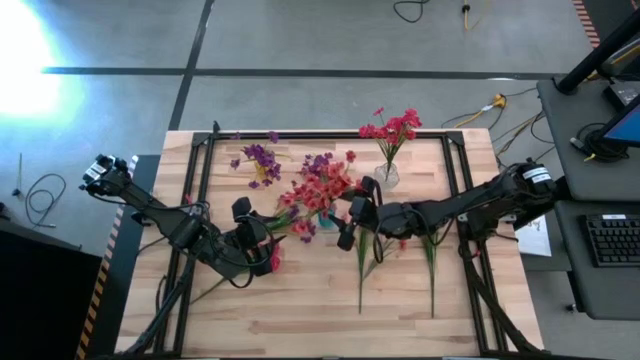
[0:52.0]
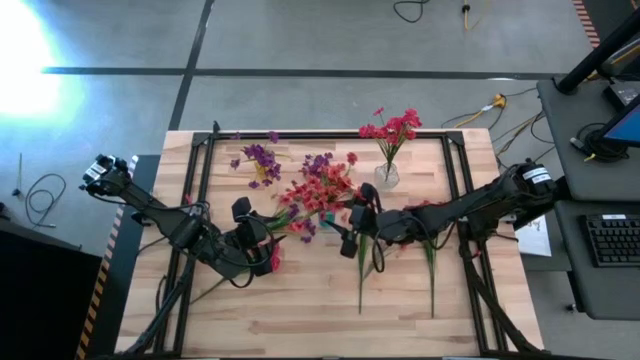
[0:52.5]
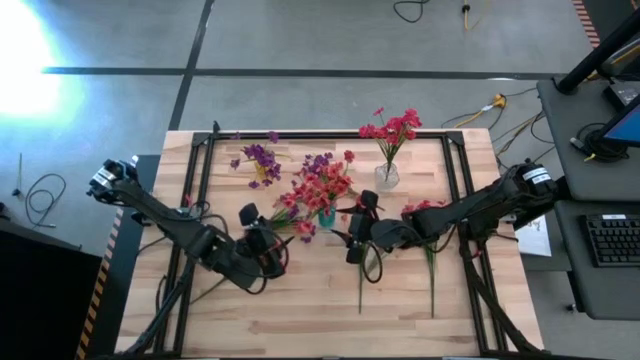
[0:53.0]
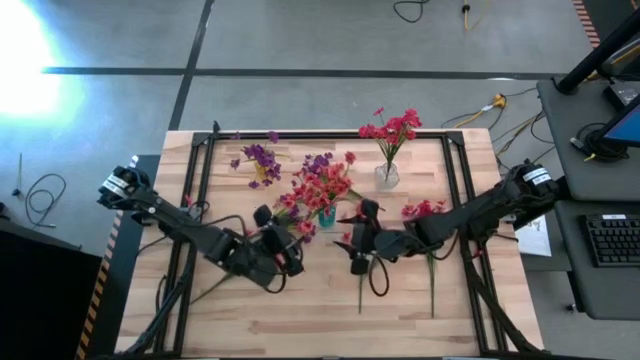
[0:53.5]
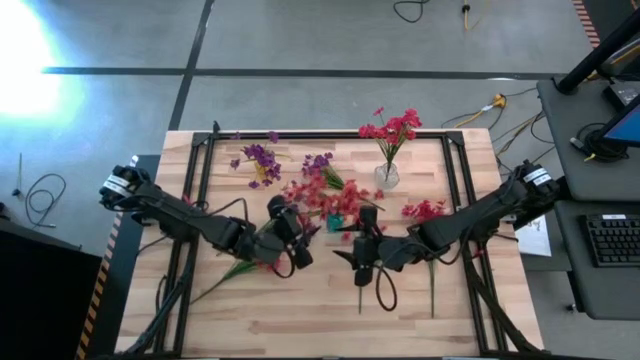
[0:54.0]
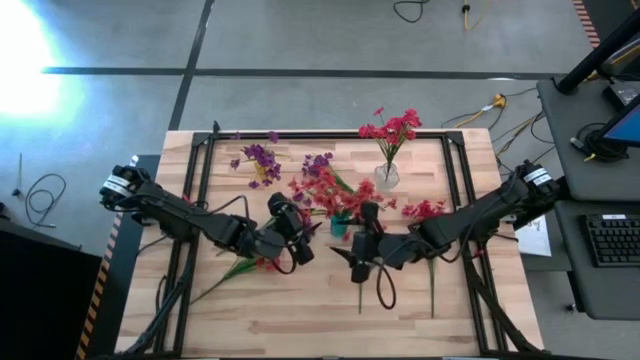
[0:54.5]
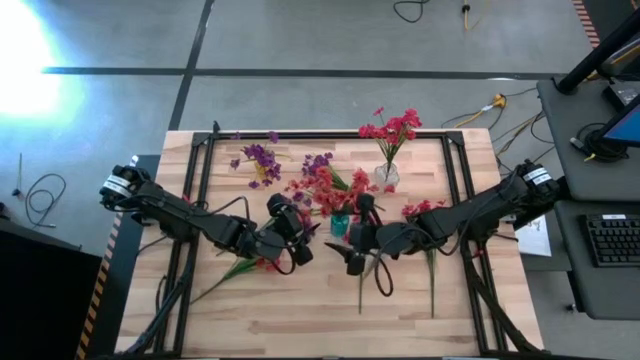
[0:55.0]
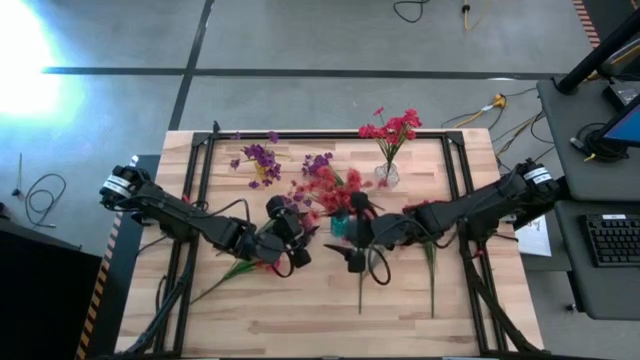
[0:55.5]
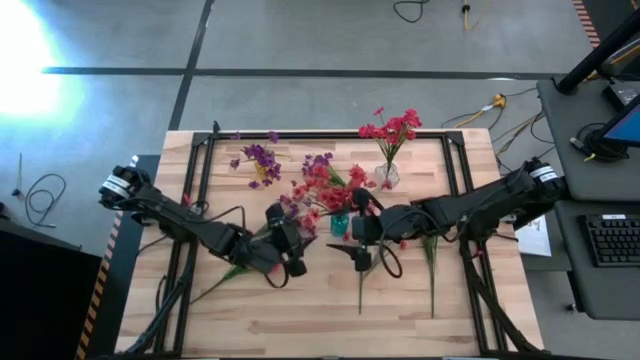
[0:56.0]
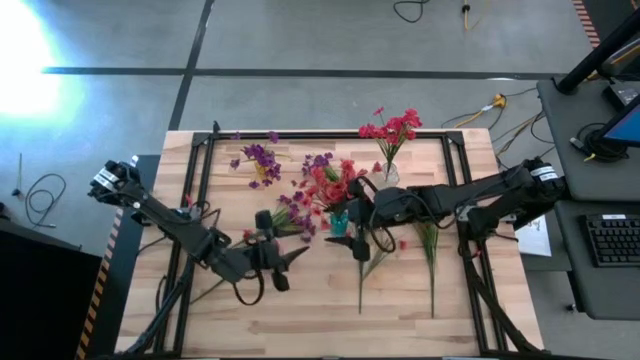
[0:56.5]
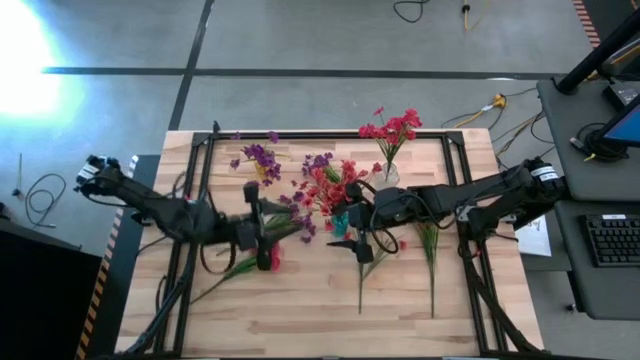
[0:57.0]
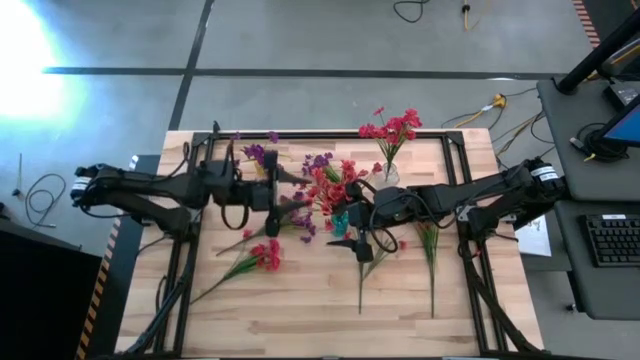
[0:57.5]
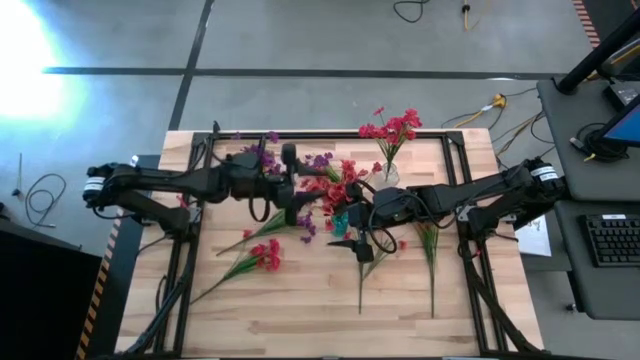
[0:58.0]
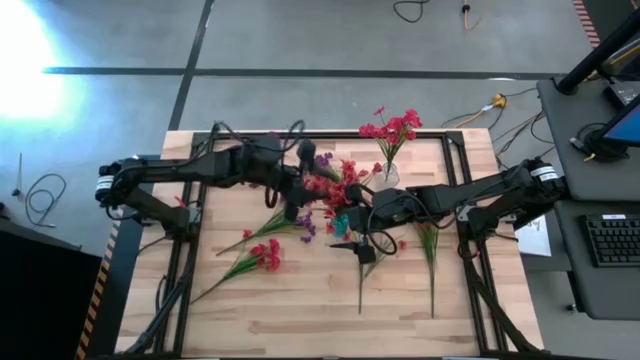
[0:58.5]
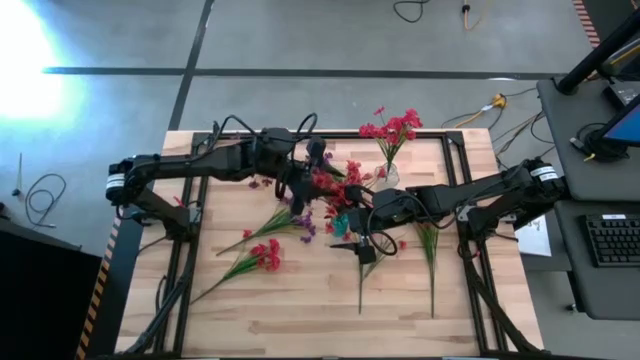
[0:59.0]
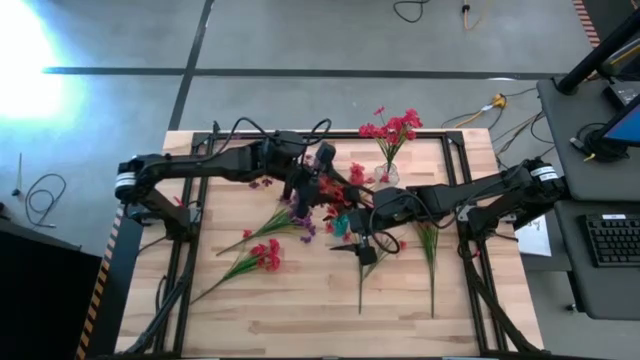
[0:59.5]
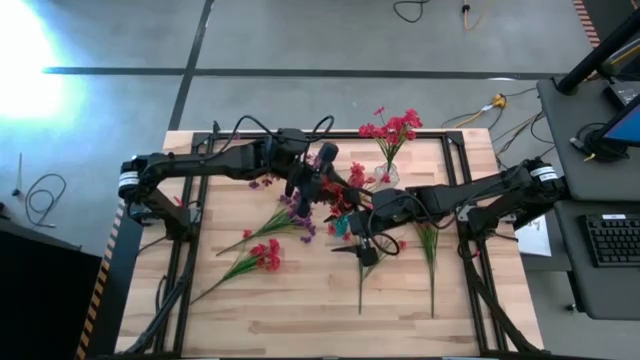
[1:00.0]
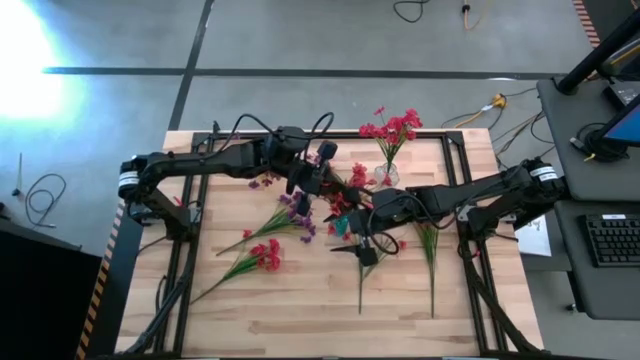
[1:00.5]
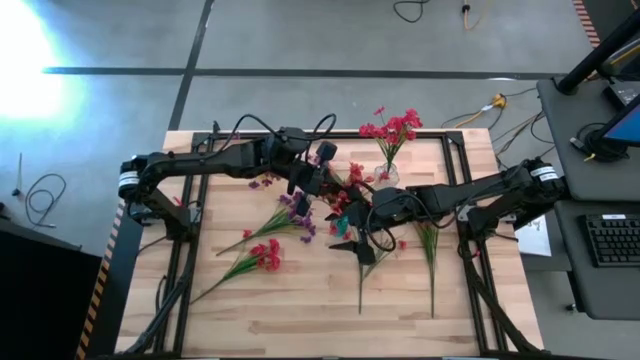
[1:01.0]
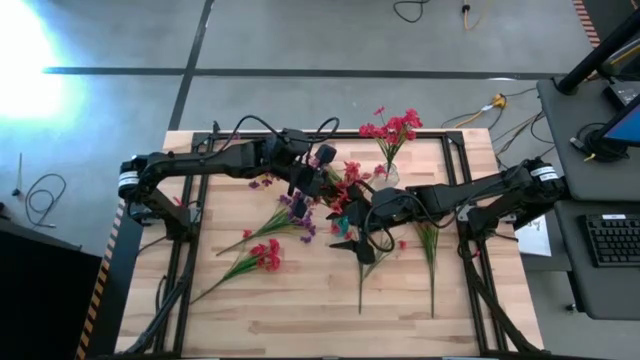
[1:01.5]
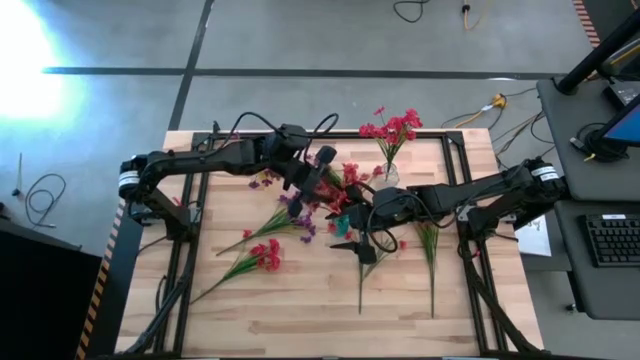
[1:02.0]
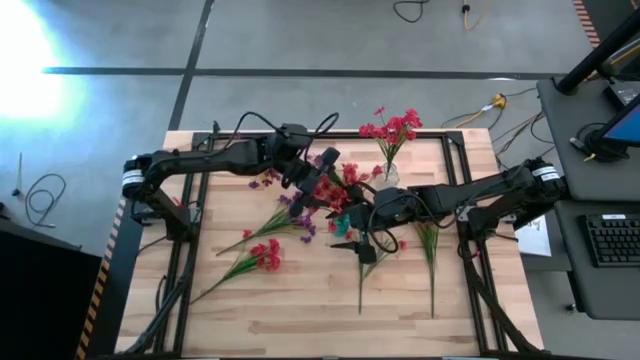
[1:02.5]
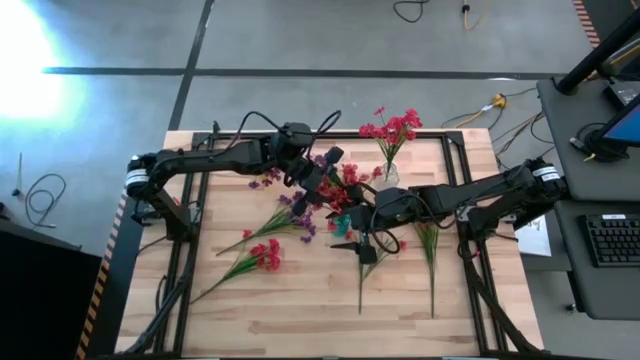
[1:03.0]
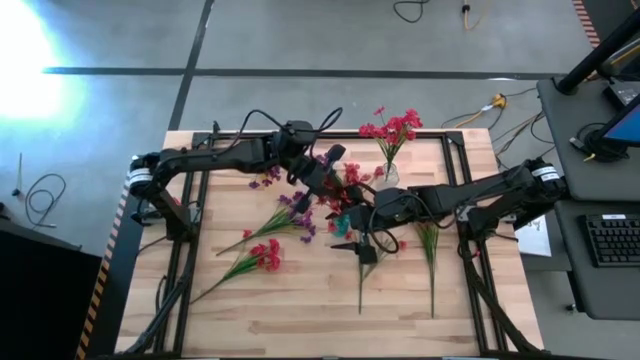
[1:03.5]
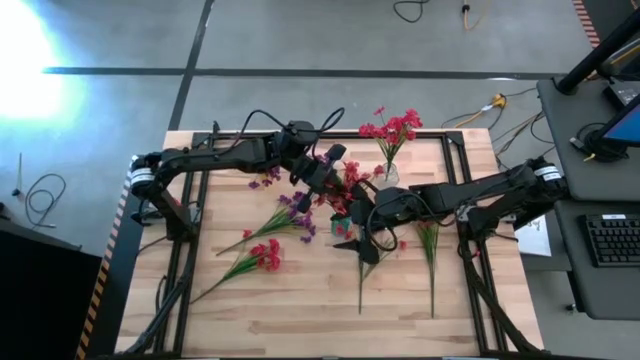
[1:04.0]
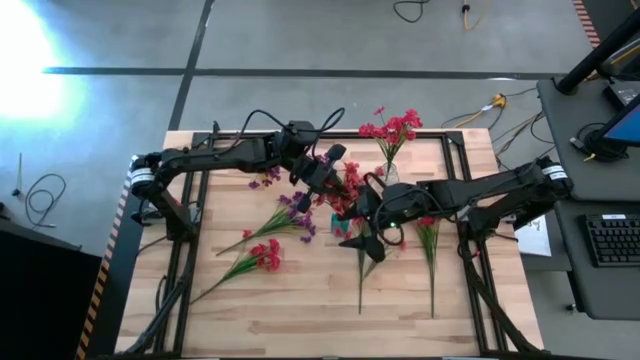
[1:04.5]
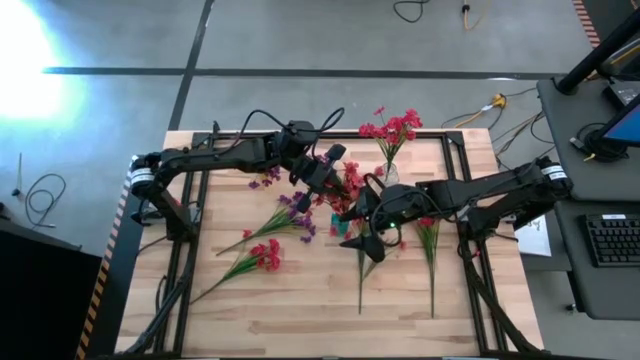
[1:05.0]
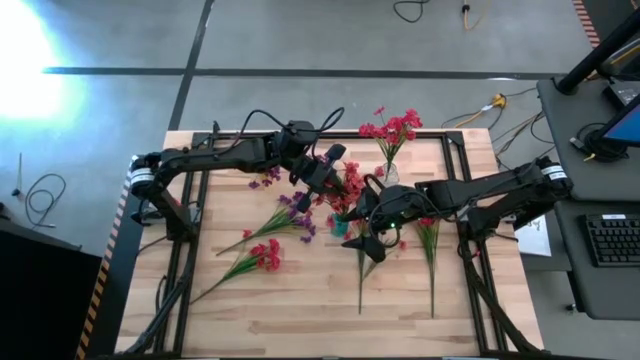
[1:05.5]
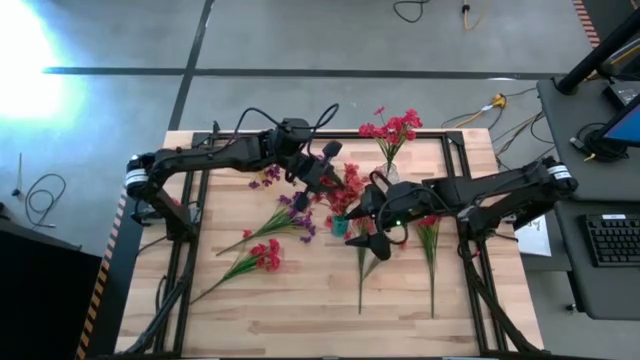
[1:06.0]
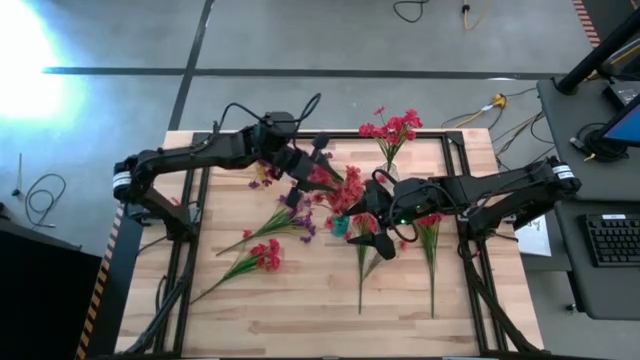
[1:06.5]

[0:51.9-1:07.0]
Task: Sort flowers into vase by color
Put the left orange flowers into the blue vase

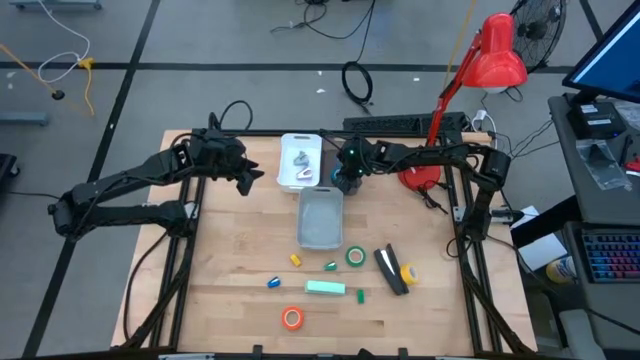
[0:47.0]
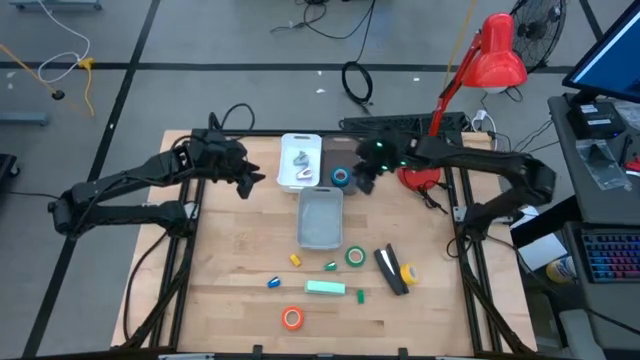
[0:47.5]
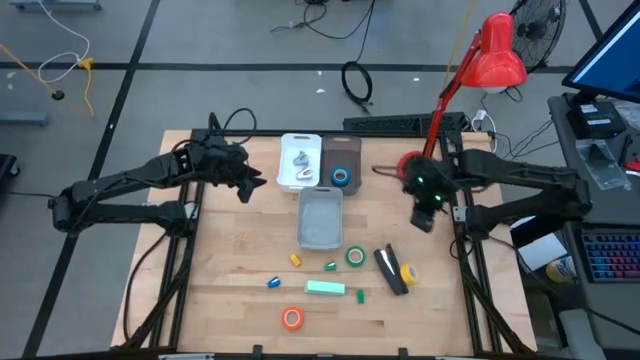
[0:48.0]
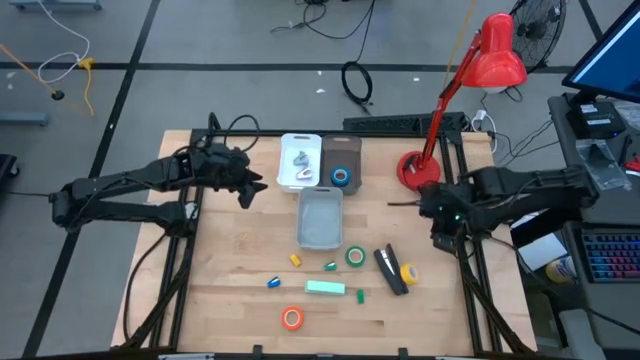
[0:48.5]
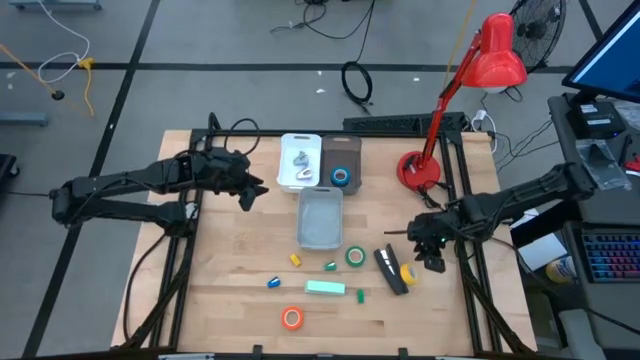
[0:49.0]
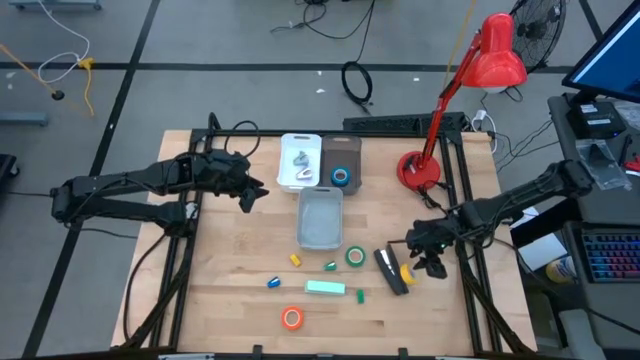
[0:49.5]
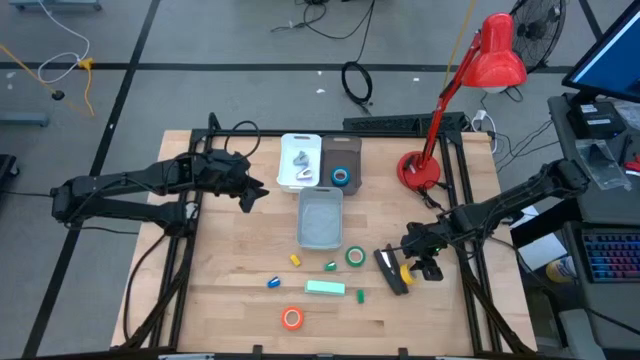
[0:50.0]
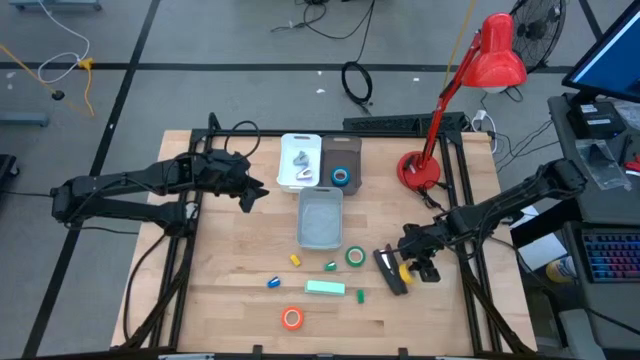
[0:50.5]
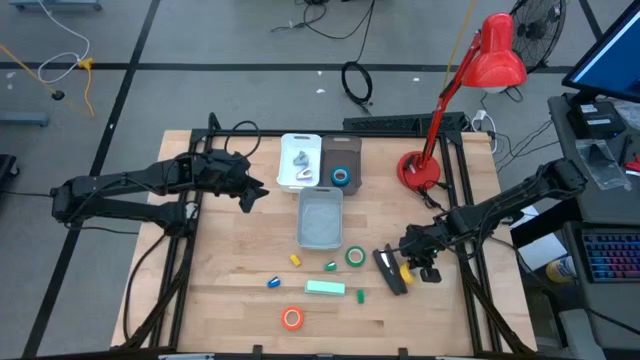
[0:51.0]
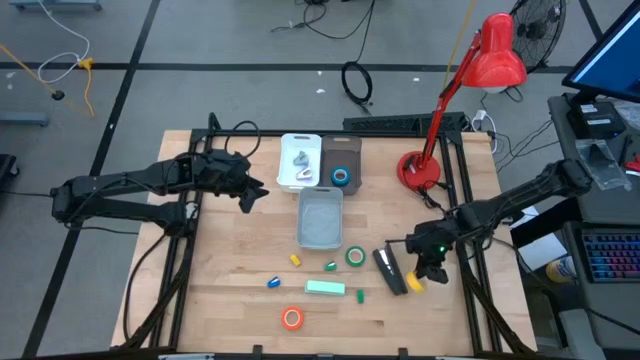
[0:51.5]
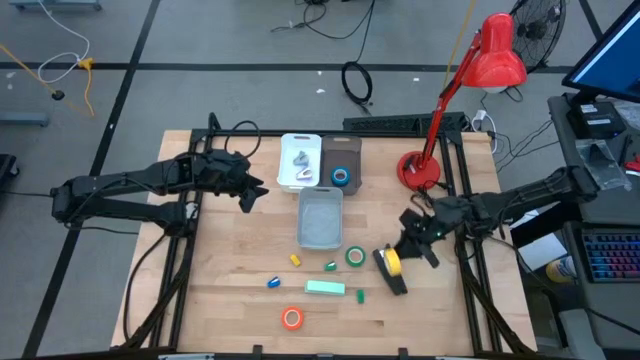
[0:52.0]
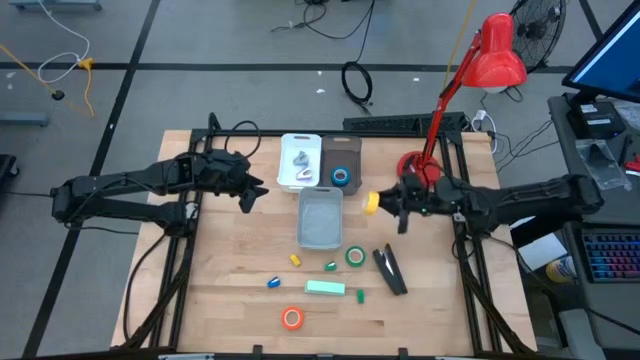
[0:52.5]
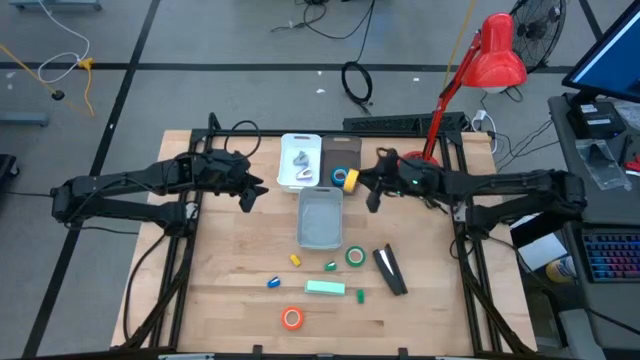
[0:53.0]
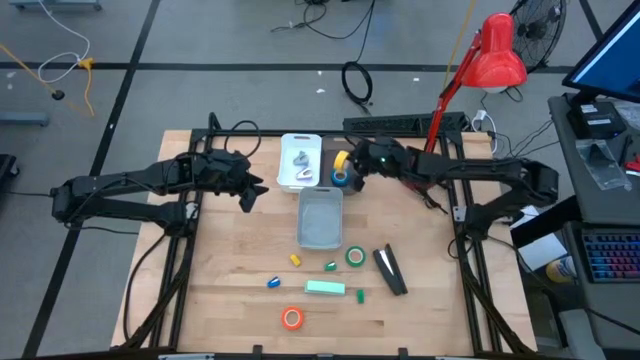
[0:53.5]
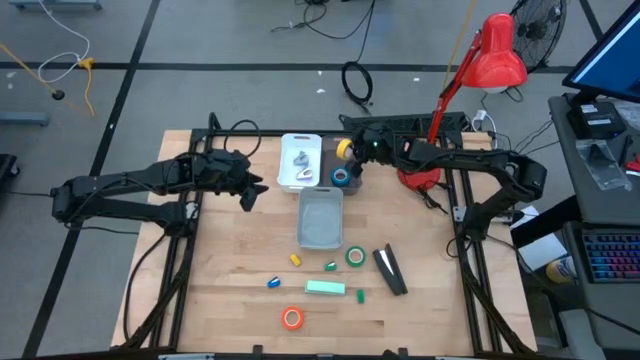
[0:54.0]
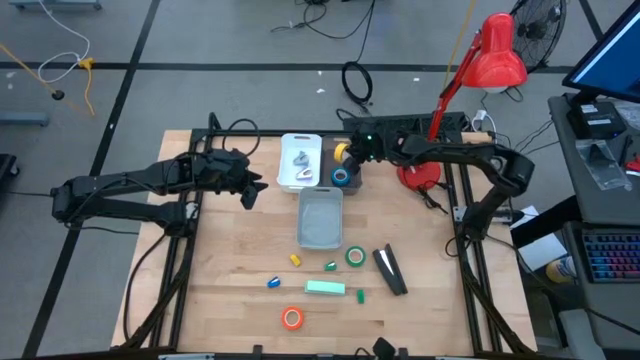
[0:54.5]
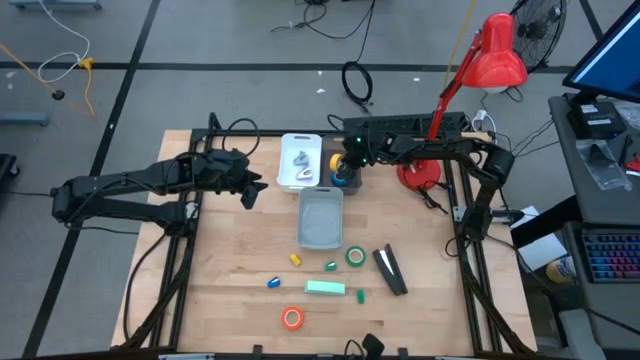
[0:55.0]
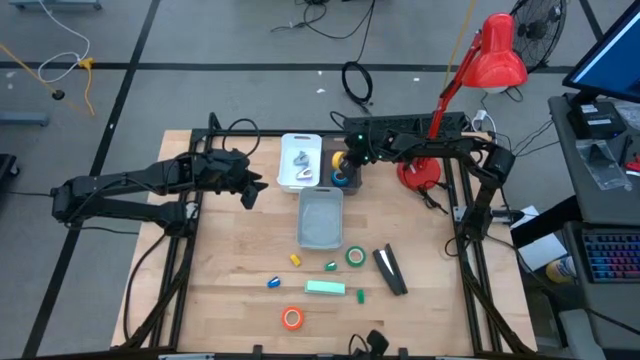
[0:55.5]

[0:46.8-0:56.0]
Task: Pick and place Stapler, Stapler remover, tape
Put the yellow tape into the black bin
